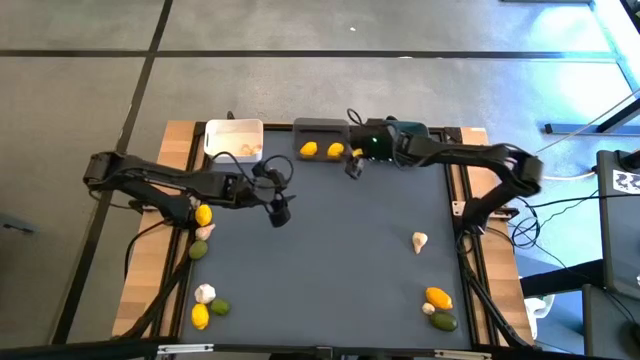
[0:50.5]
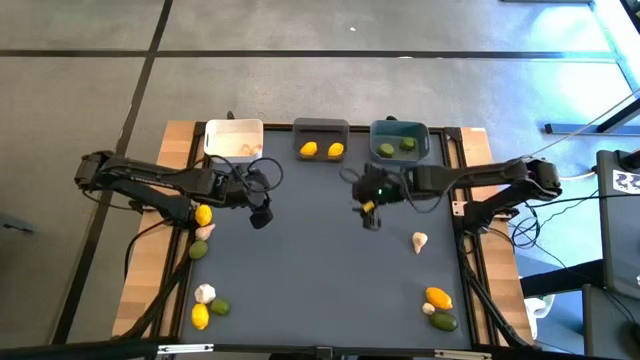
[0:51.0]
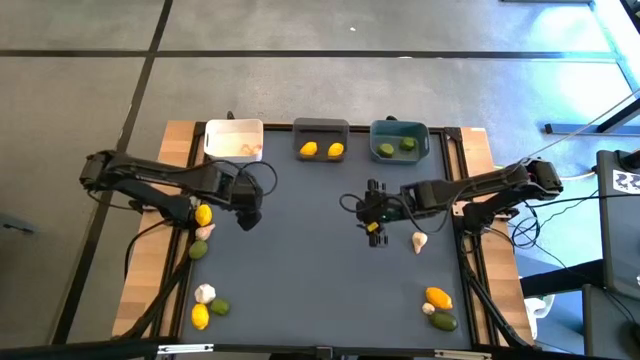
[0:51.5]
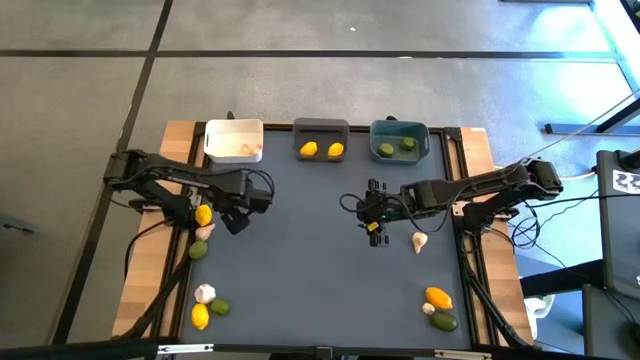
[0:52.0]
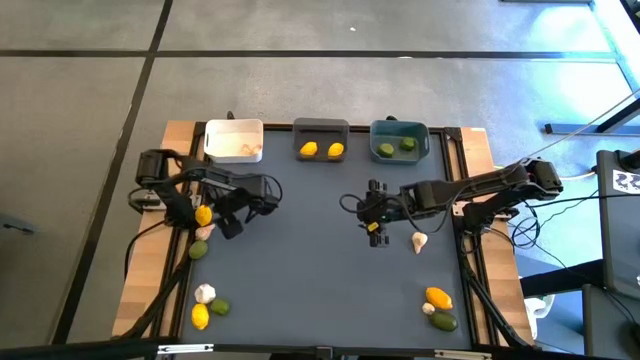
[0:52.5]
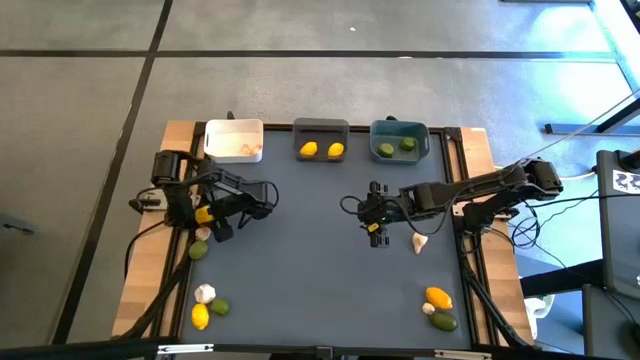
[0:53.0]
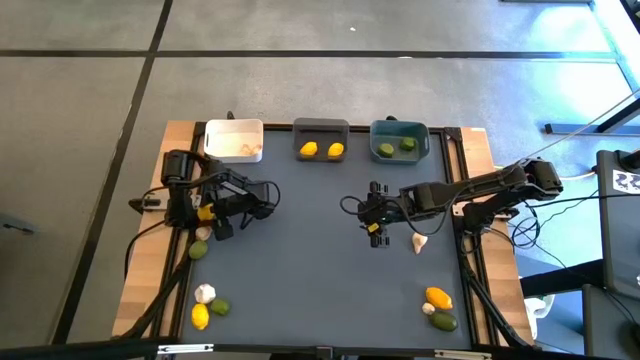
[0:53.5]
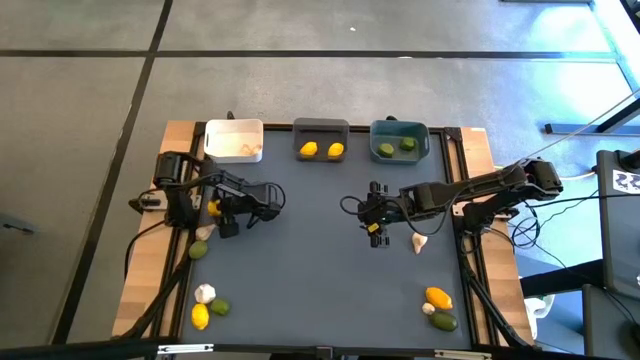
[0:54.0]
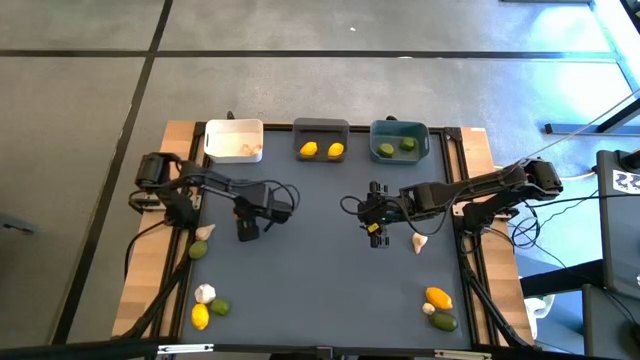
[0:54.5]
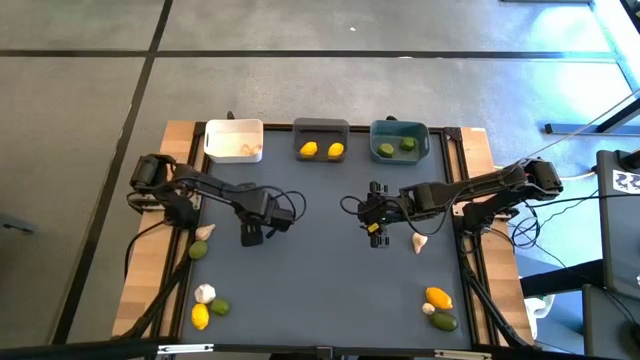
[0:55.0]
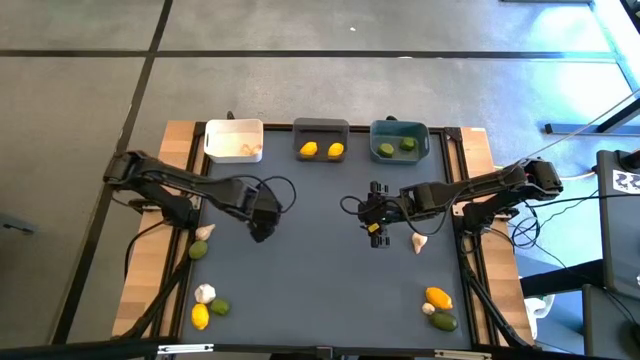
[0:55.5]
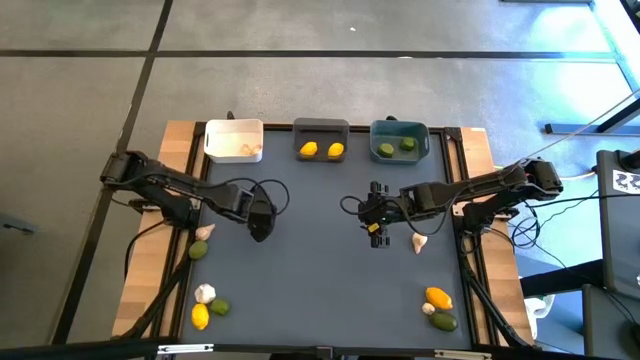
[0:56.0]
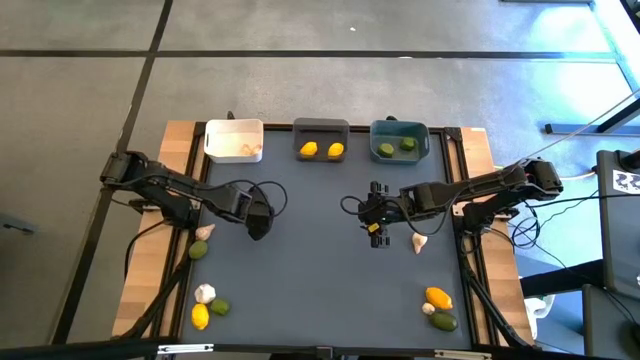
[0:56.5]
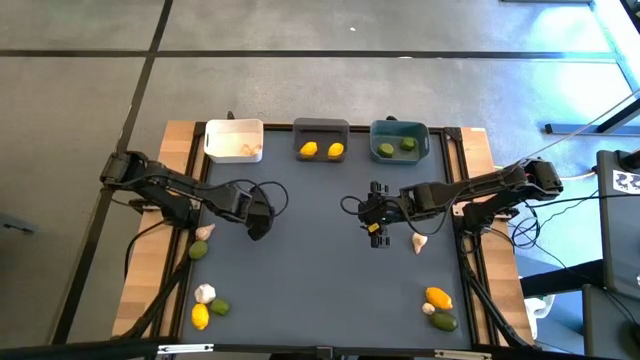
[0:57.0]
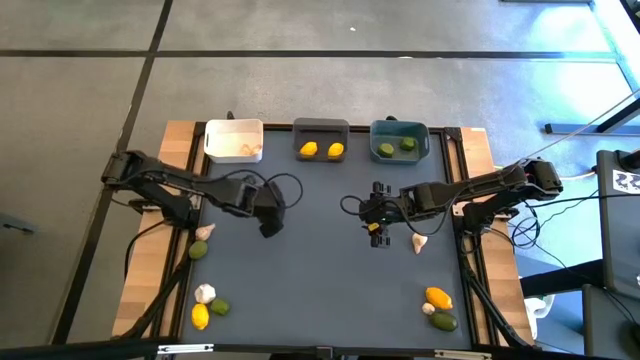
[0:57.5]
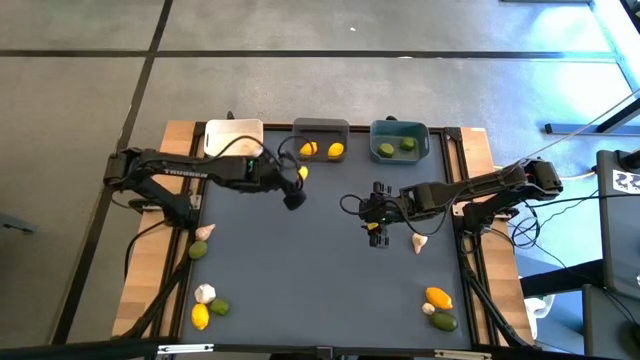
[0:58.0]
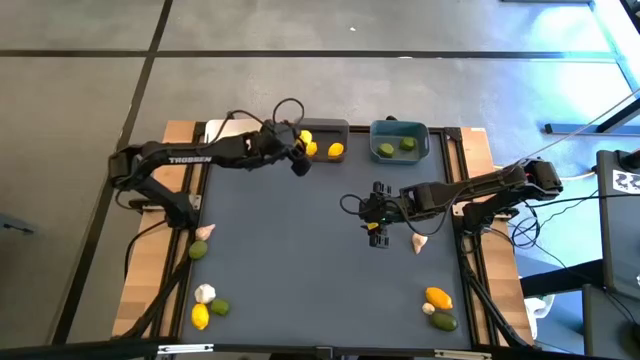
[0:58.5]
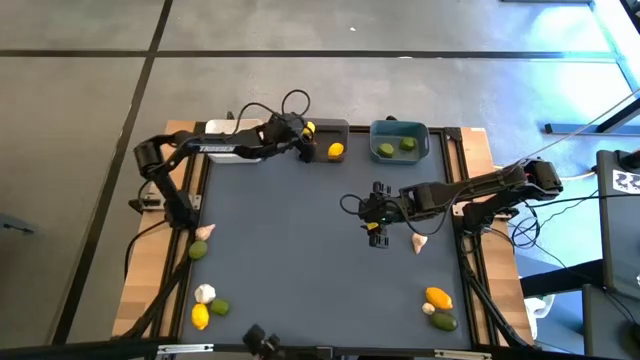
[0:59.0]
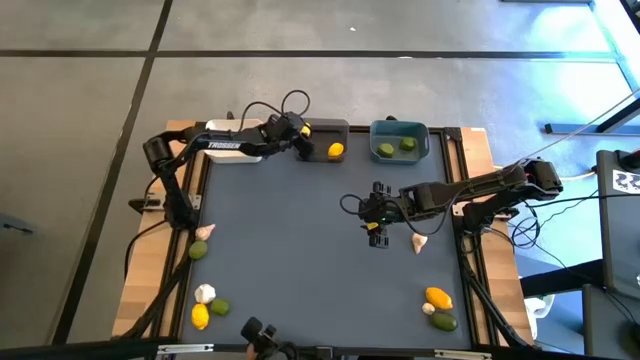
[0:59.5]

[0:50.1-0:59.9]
Task: Sort produce into baskets
Put the lemon into the black bin

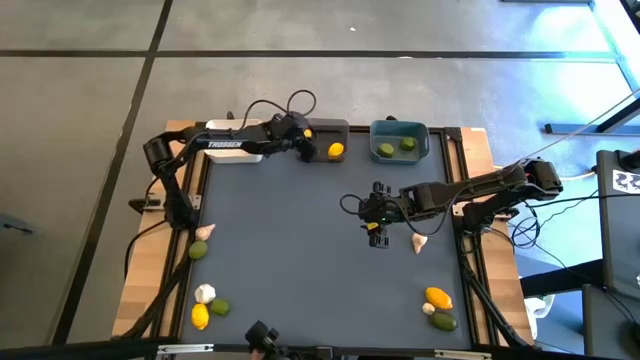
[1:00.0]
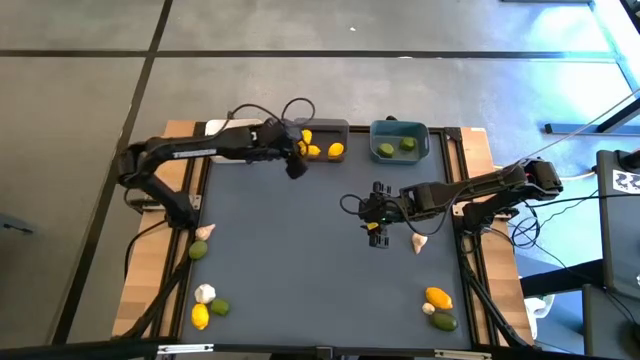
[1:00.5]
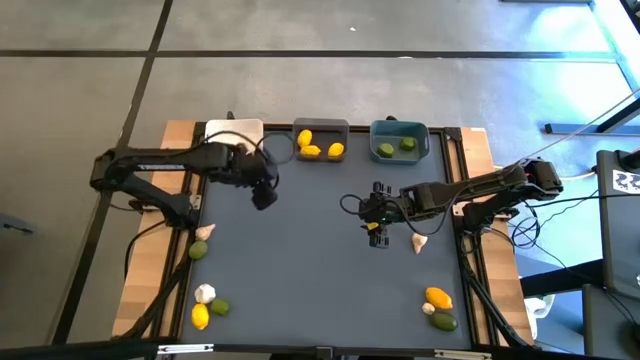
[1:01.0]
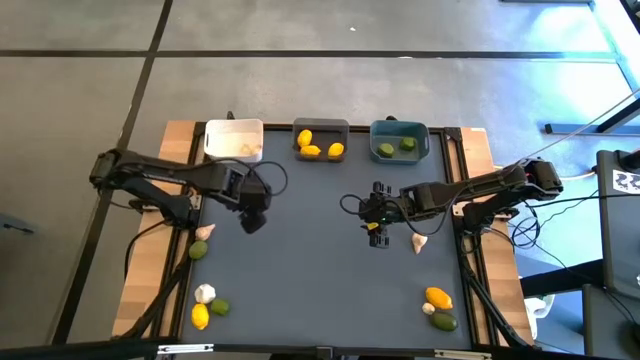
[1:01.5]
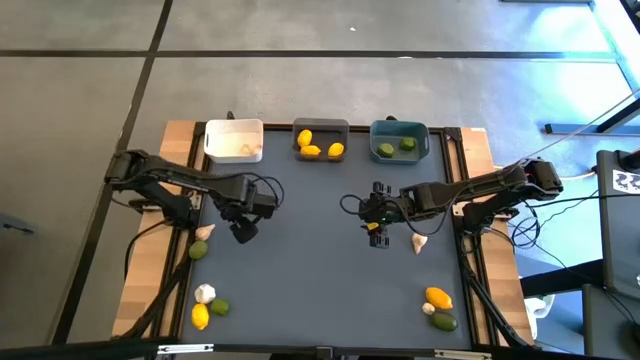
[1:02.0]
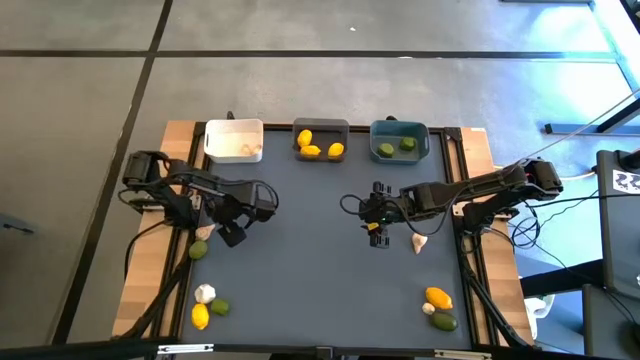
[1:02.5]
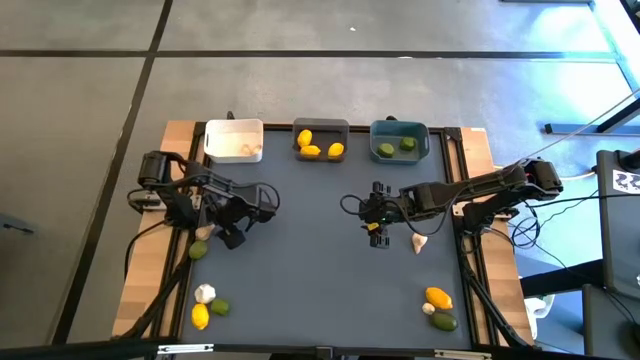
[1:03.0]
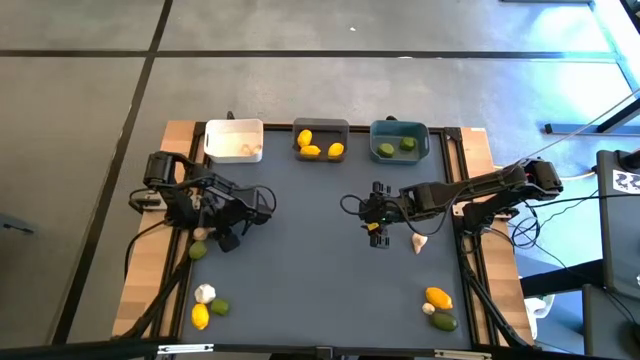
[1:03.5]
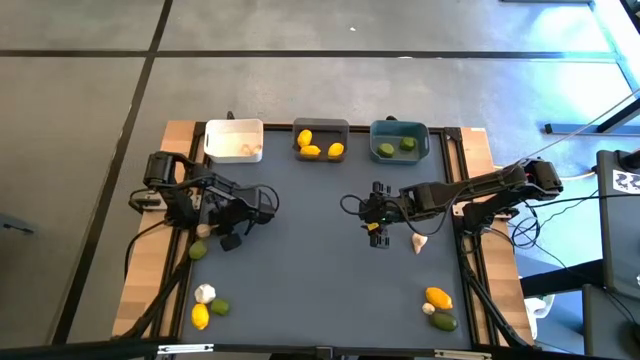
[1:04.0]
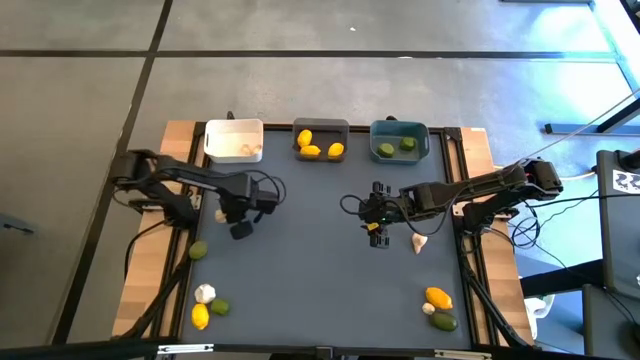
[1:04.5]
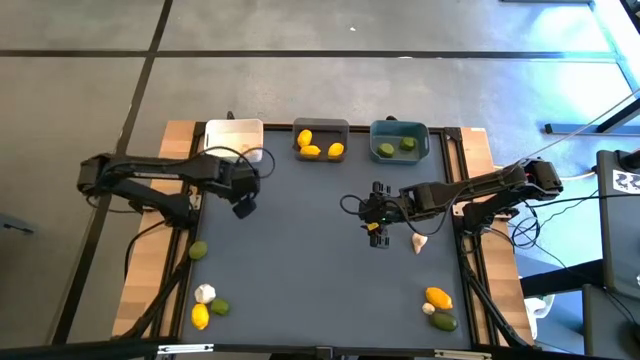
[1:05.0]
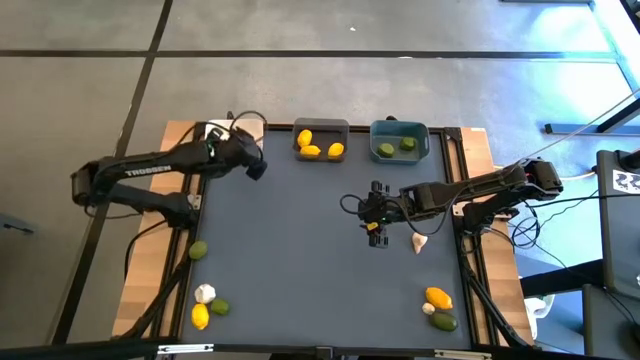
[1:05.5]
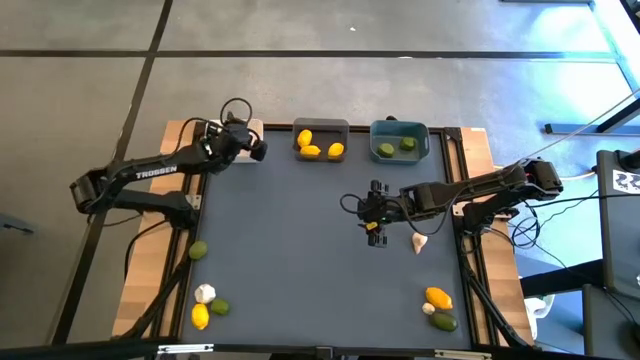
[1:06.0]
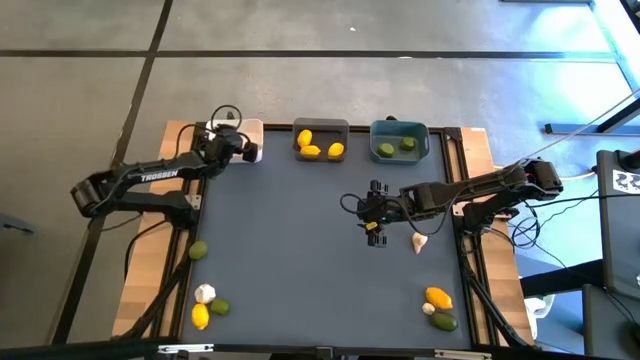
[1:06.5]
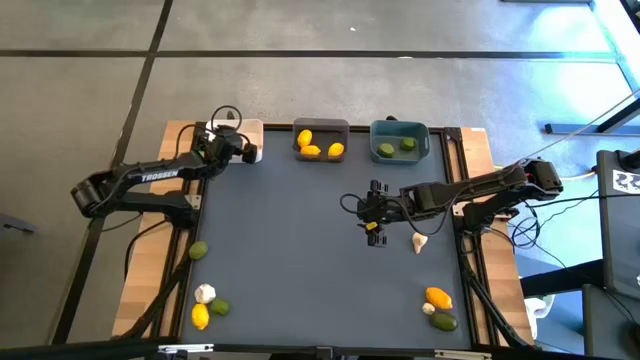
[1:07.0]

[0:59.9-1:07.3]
Put the garlic into the white bin
